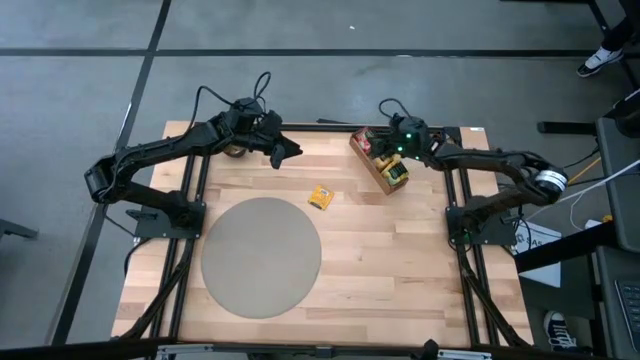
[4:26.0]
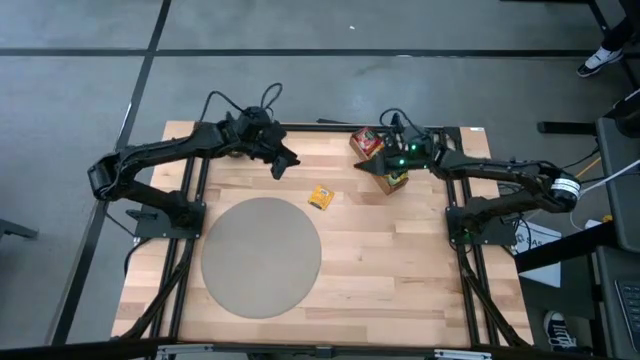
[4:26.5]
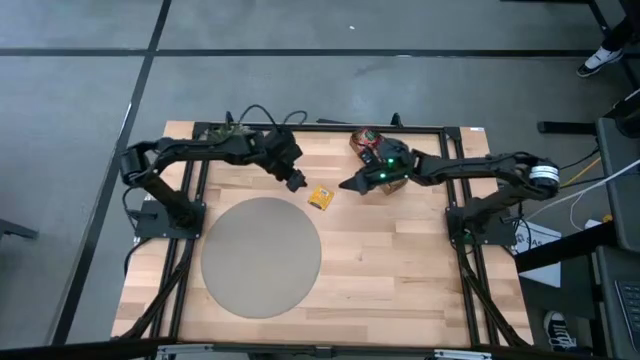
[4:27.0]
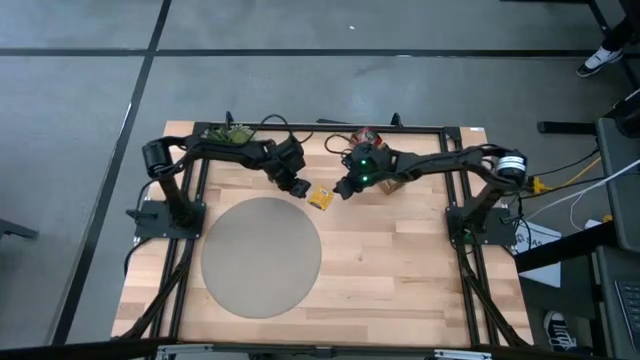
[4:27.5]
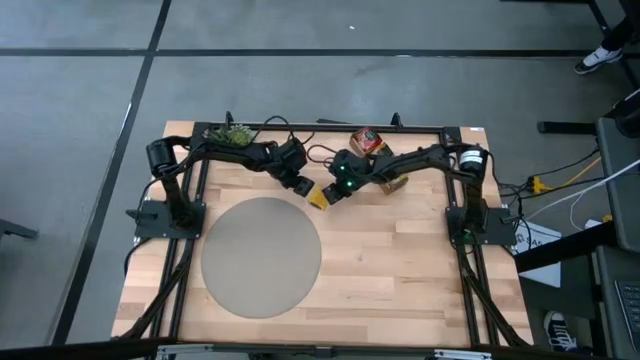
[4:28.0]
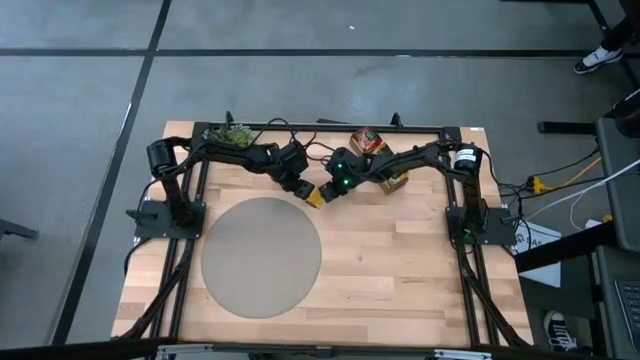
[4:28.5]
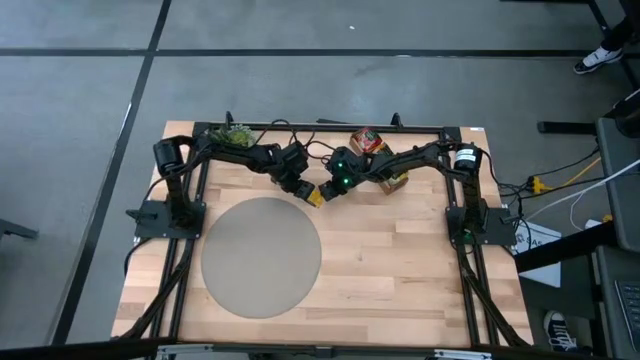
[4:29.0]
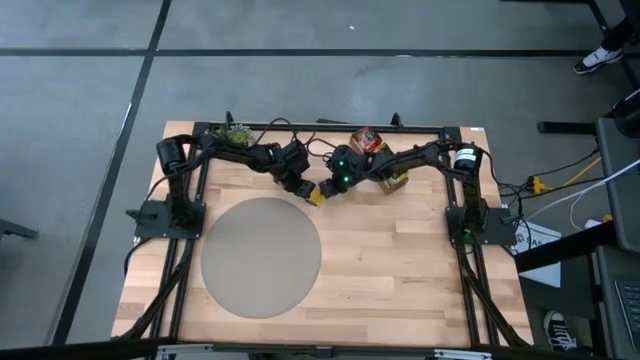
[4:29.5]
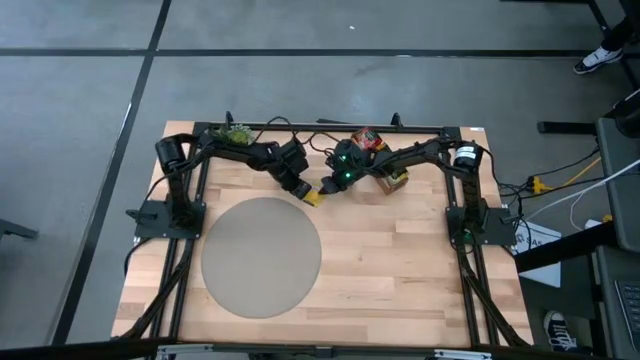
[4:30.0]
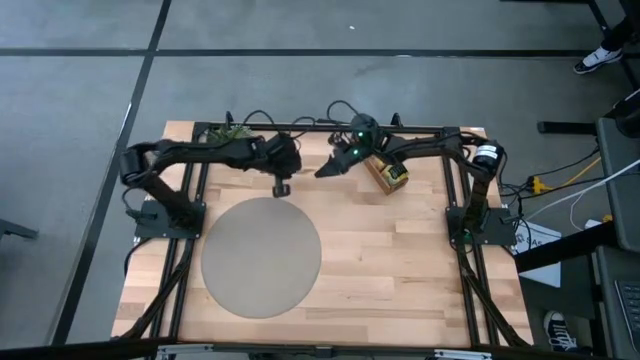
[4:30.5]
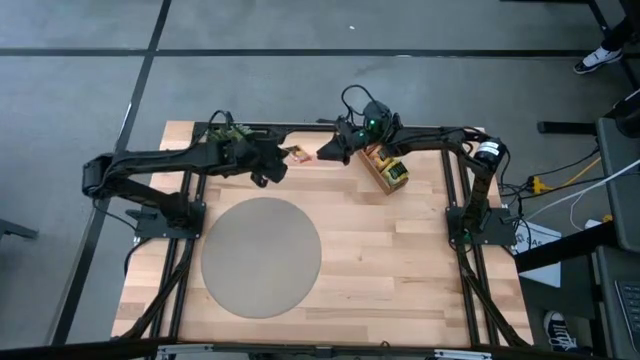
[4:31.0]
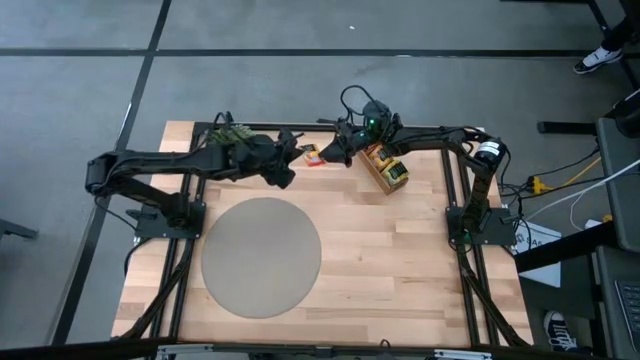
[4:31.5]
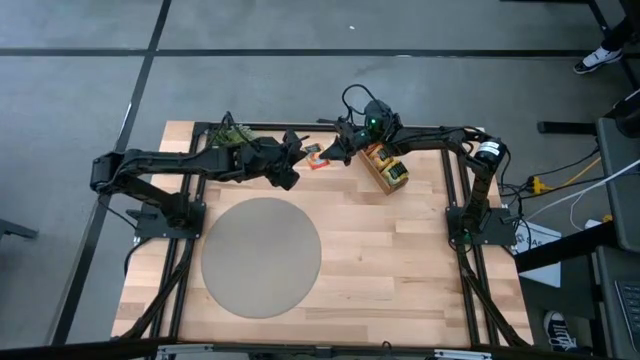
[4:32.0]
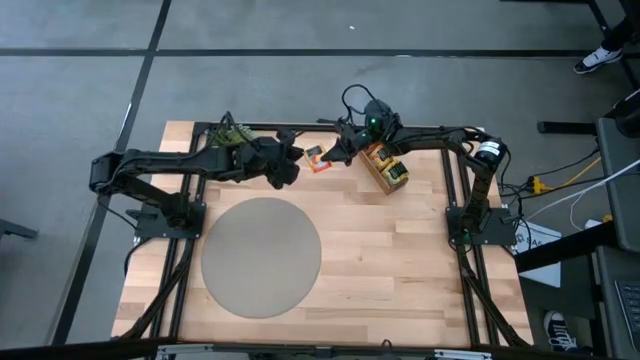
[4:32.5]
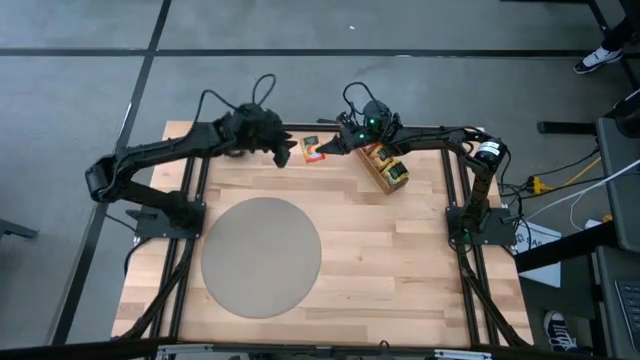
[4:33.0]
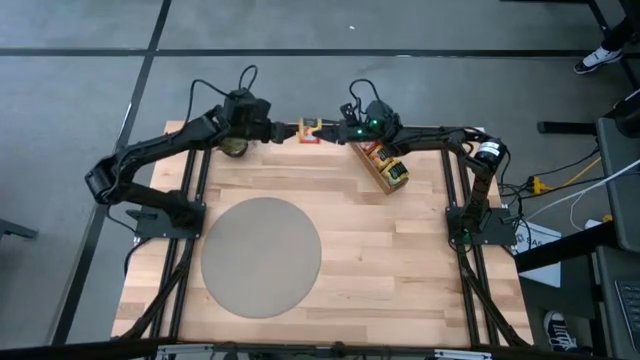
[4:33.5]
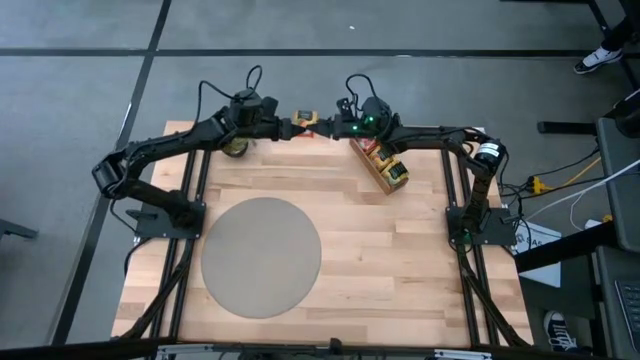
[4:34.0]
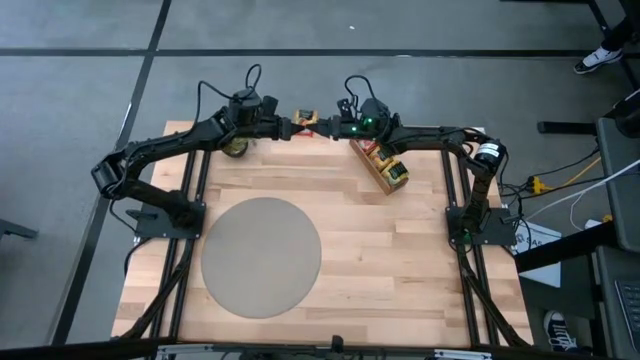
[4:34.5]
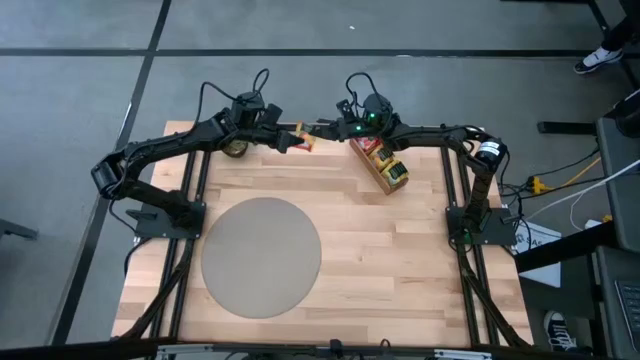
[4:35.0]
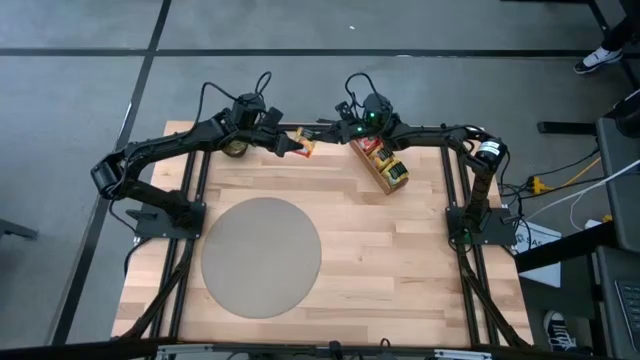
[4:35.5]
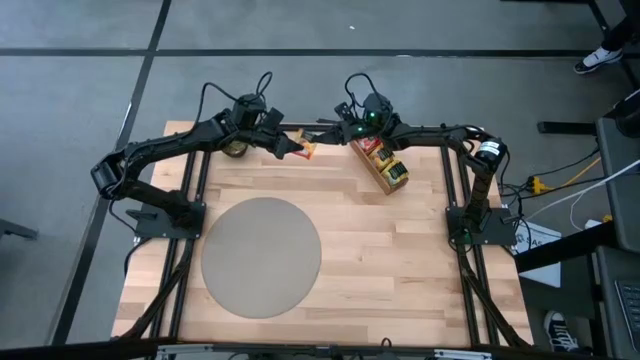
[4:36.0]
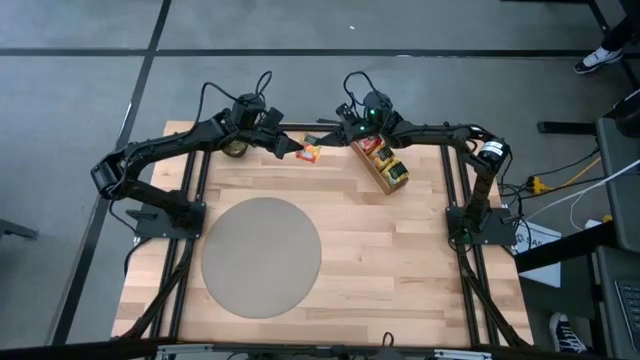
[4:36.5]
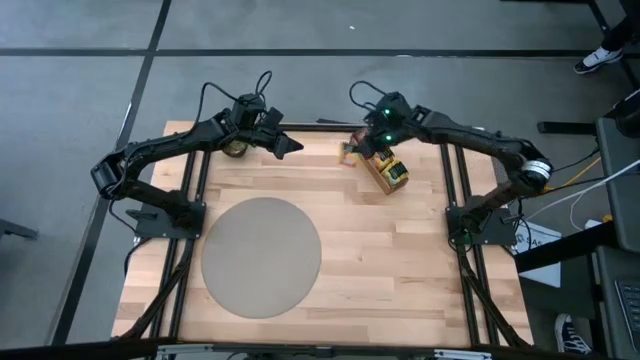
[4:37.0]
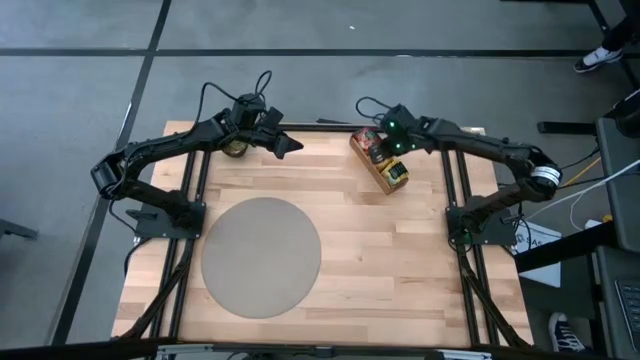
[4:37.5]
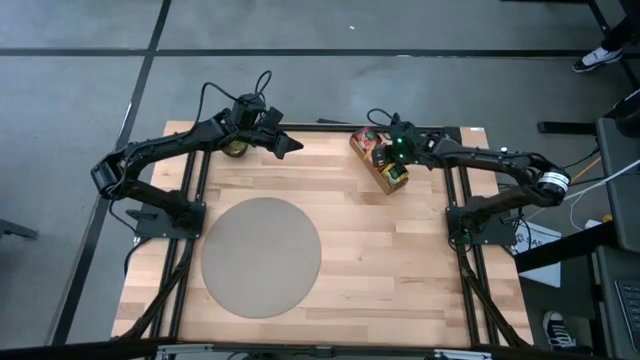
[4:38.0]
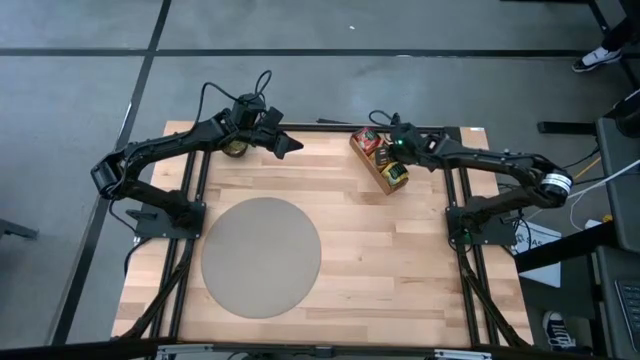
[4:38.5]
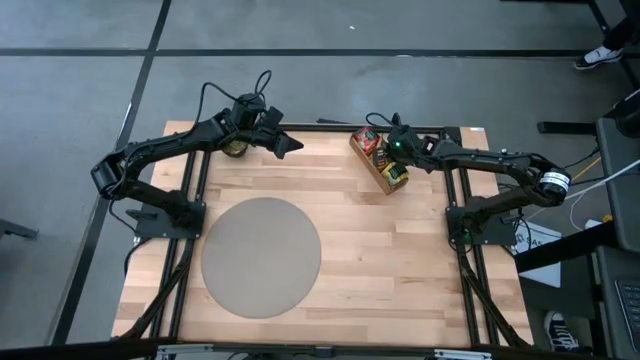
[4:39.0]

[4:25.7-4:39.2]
Task: Pick & Place Tea
Put the orange tea bag into the middle section of the wooden organizer

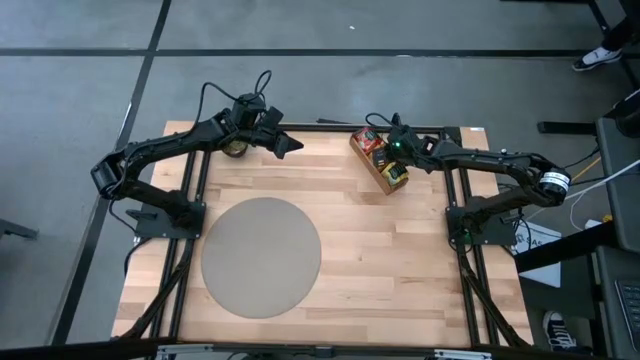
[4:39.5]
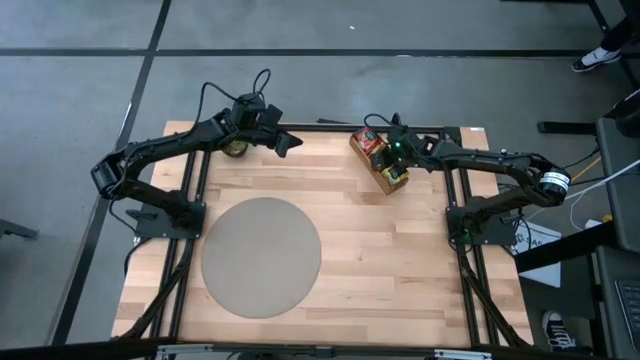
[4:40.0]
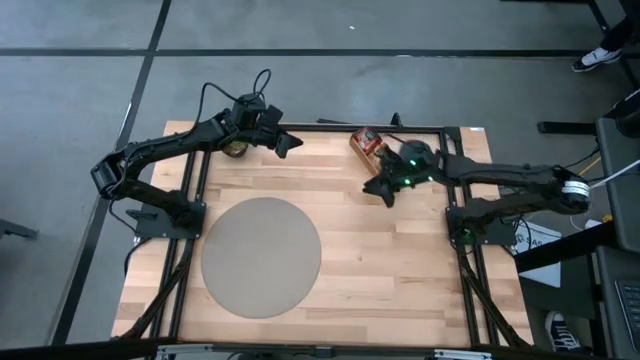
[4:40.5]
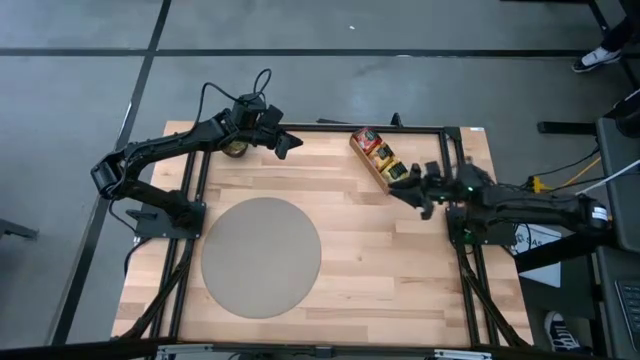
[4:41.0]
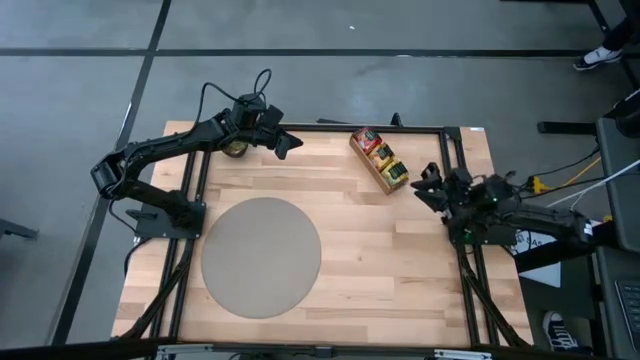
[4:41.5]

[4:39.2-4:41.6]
Return to Home Position

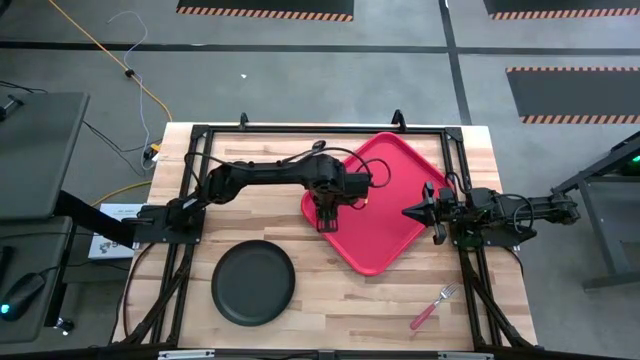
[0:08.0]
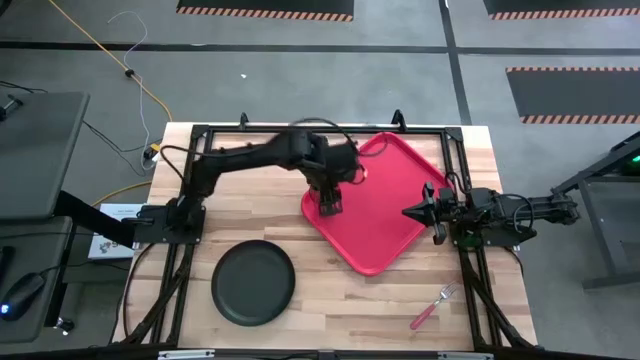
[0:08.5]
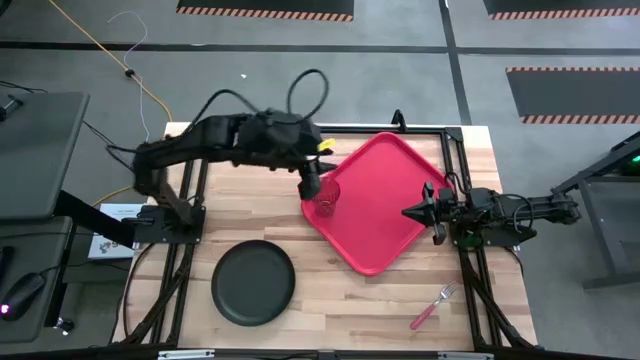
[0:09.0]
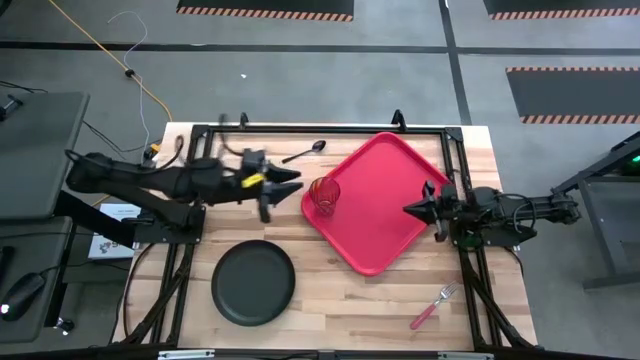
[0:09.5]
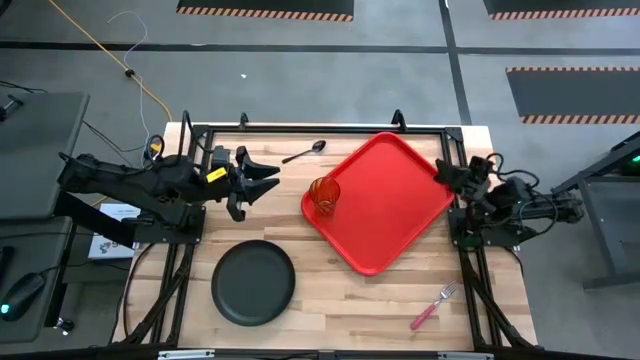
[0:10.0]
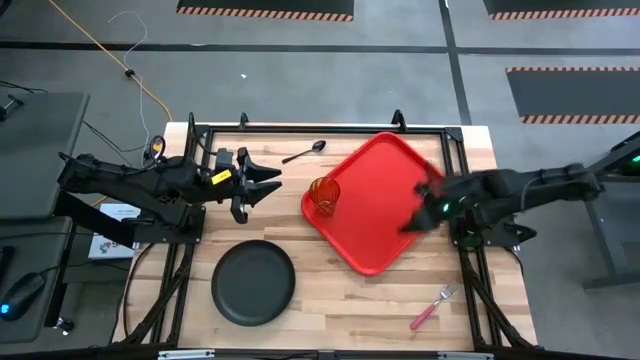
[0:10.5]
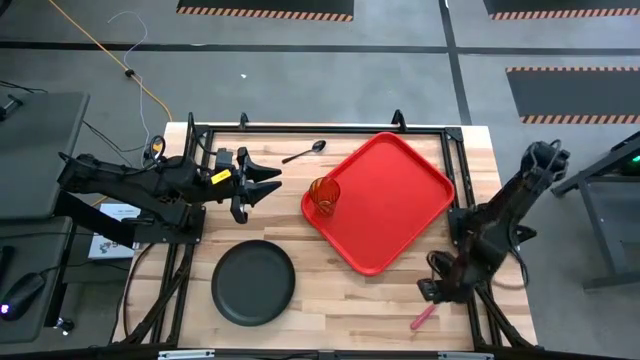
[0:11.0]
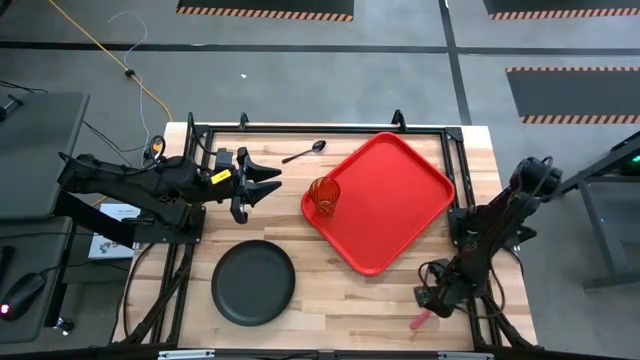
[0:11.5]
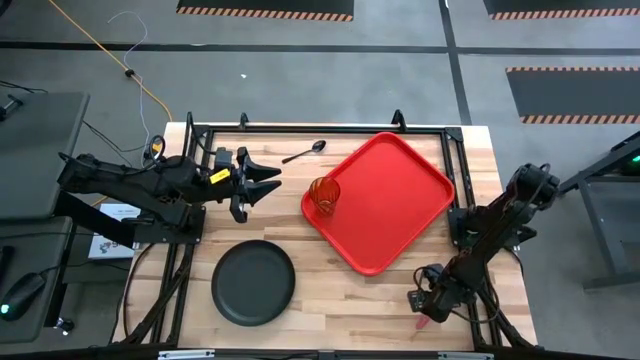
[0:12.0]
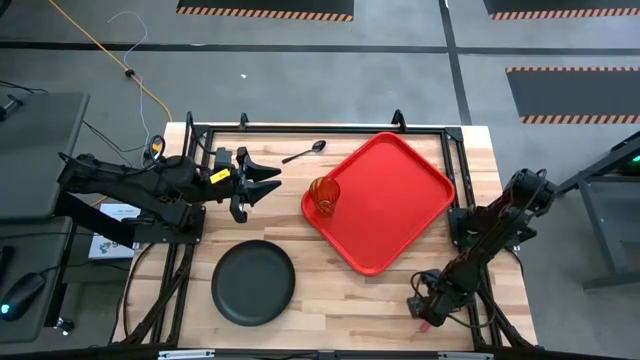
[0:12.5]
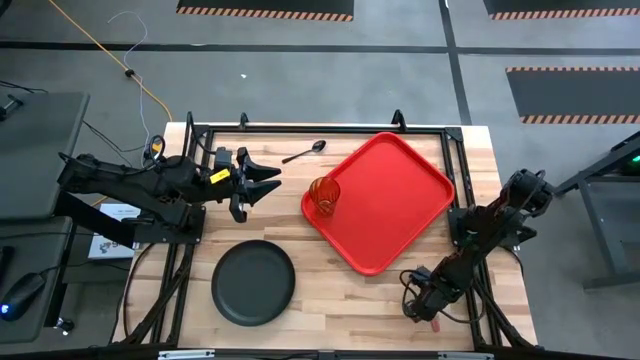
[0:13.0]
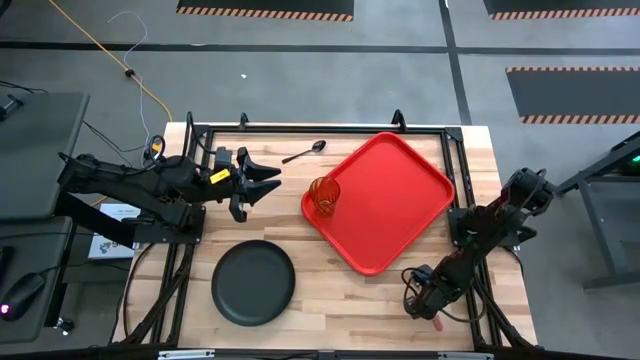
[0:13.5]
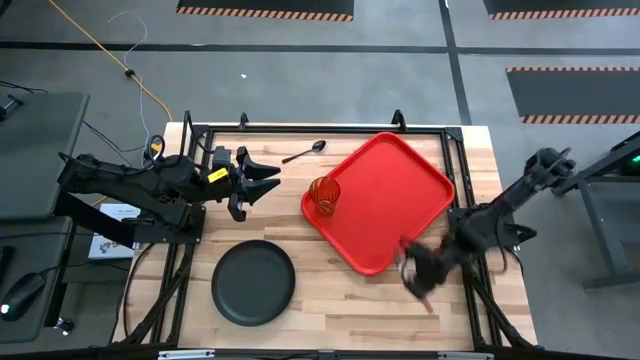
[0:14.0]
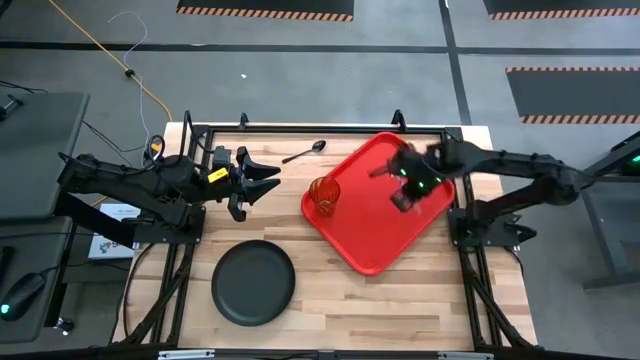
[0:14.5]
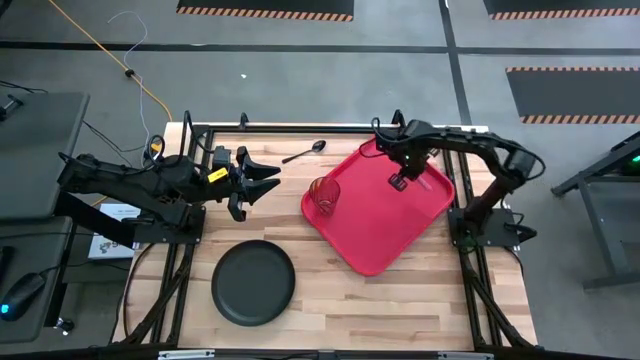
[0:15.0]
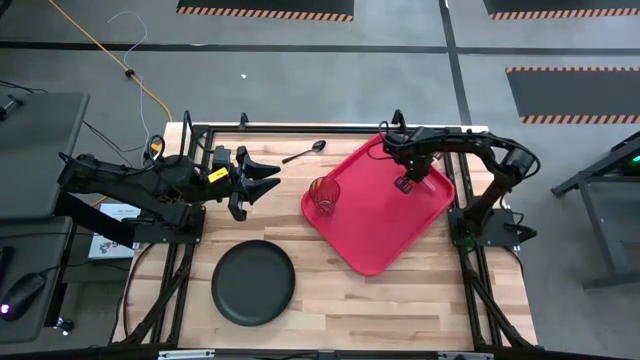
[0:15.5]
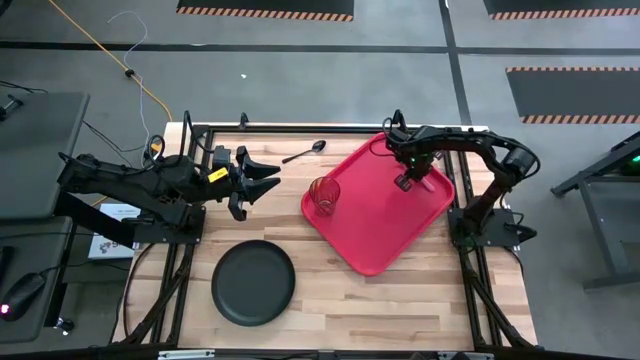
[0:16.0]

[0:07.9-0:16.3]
Task: Pick and place plate/cup/fork/spoon on tray
Put the pink fork on the right side of the red serving tray
